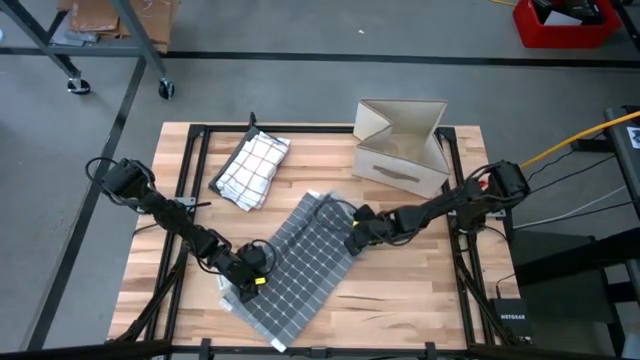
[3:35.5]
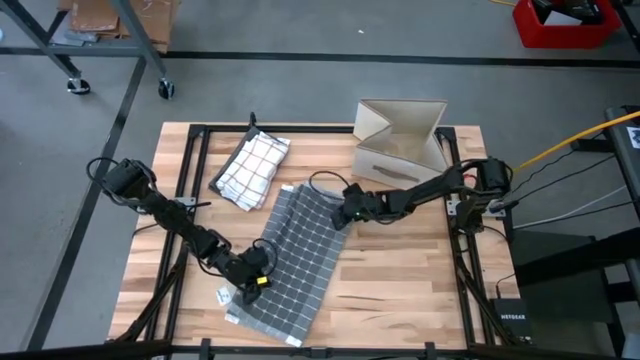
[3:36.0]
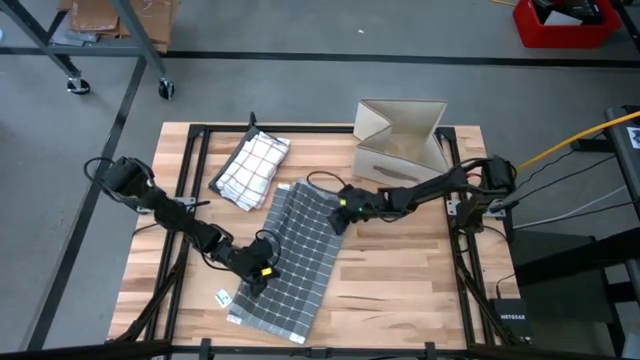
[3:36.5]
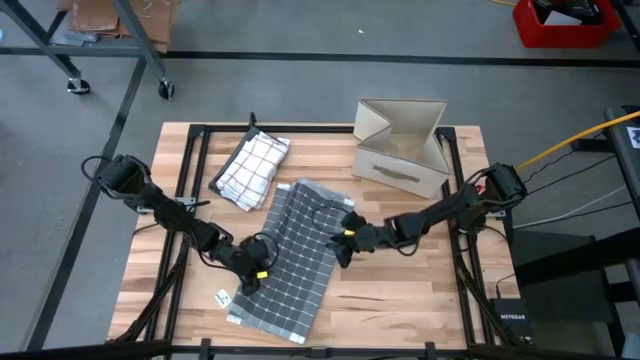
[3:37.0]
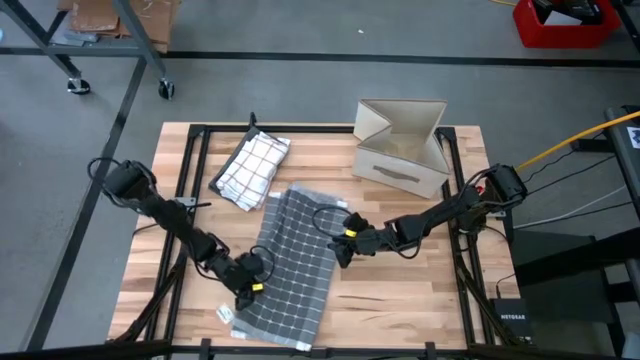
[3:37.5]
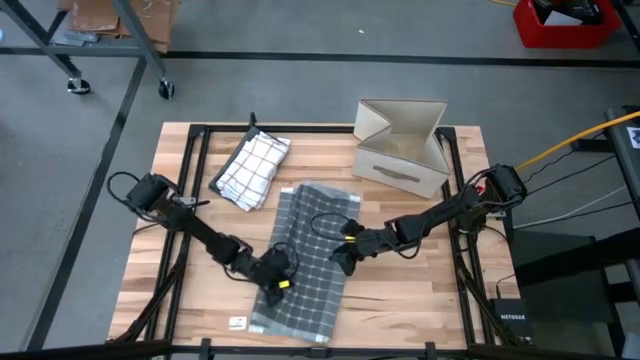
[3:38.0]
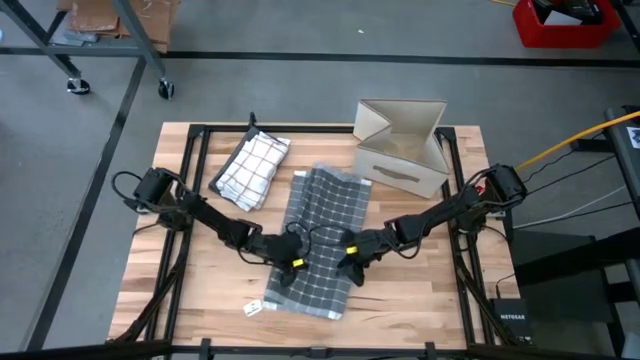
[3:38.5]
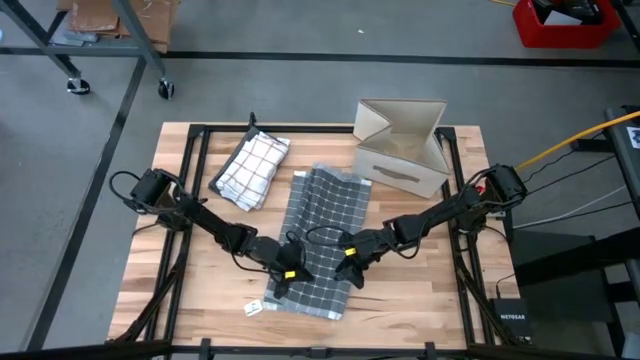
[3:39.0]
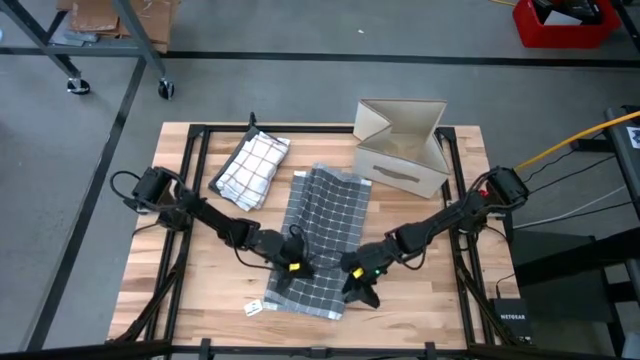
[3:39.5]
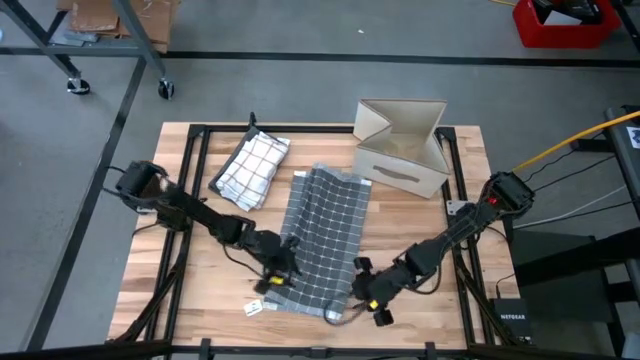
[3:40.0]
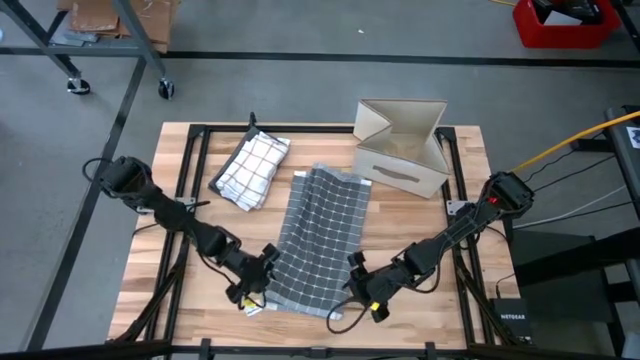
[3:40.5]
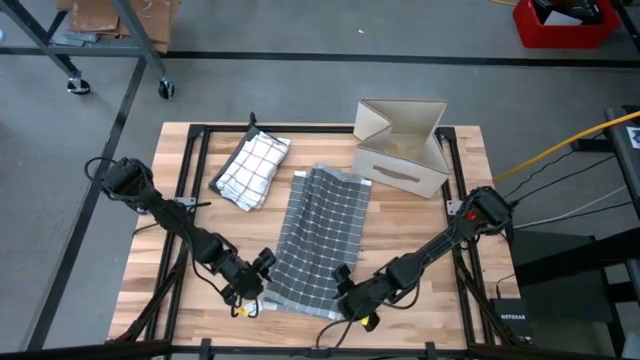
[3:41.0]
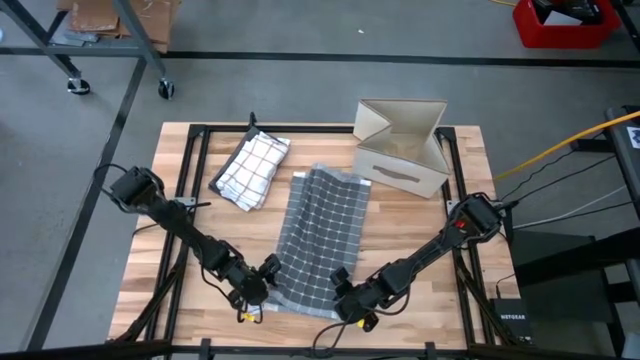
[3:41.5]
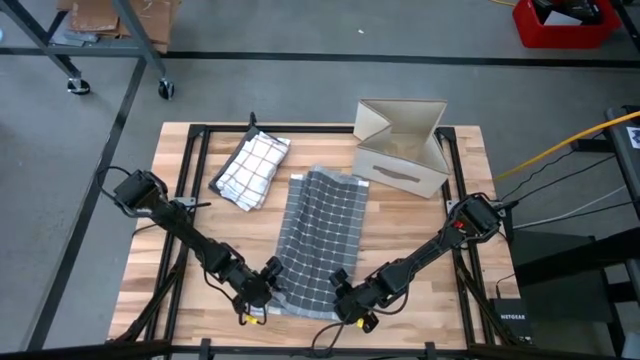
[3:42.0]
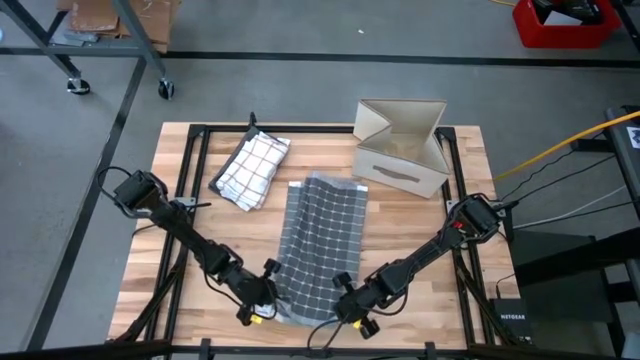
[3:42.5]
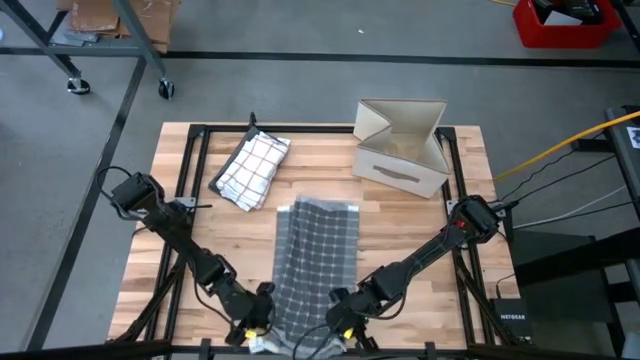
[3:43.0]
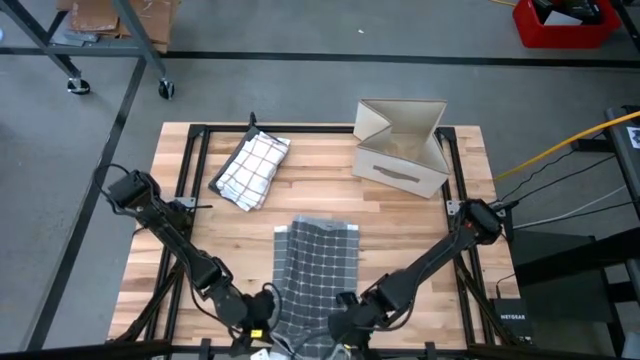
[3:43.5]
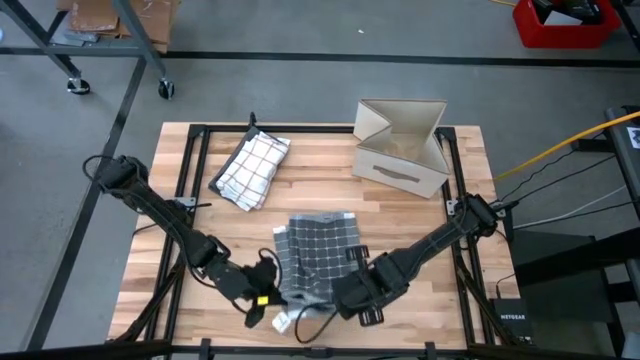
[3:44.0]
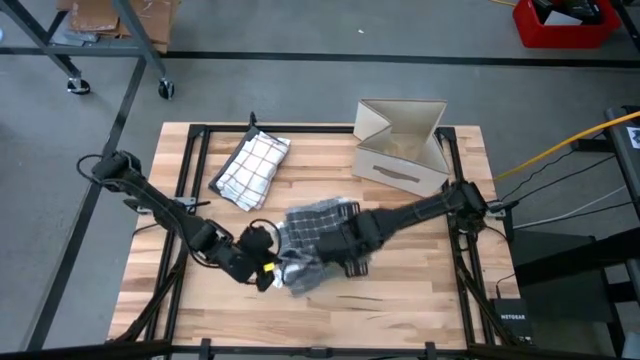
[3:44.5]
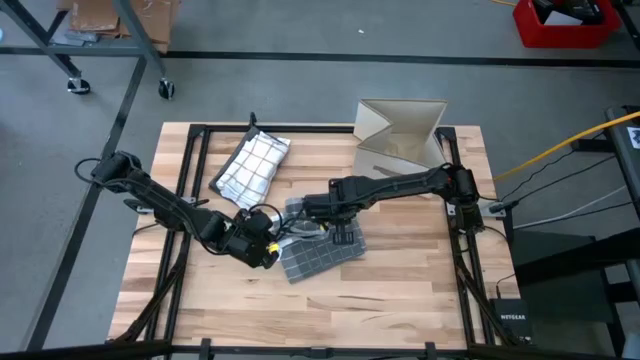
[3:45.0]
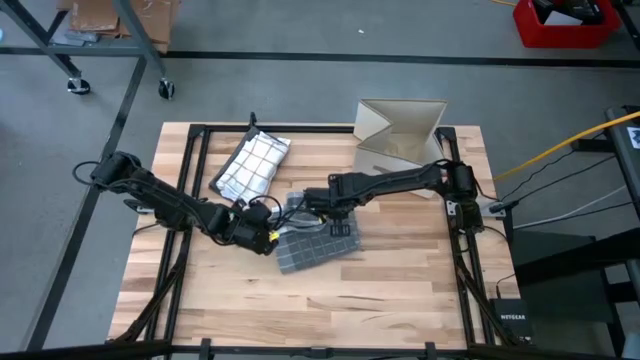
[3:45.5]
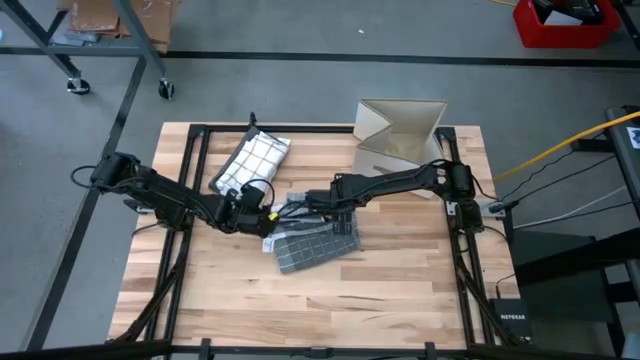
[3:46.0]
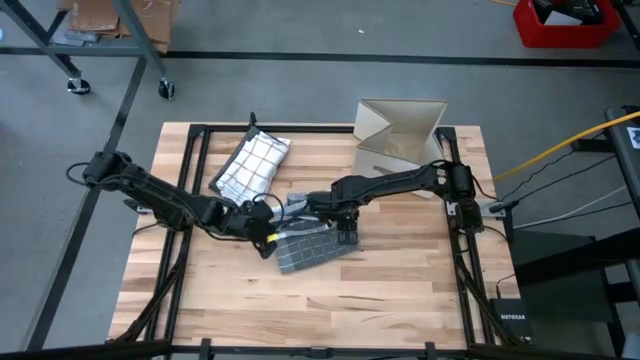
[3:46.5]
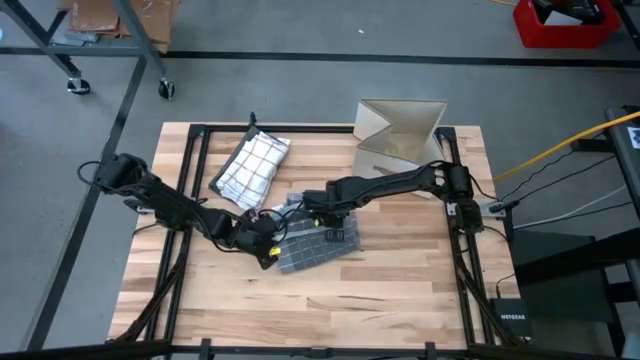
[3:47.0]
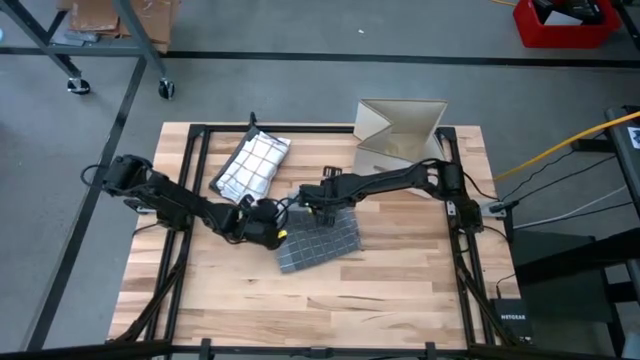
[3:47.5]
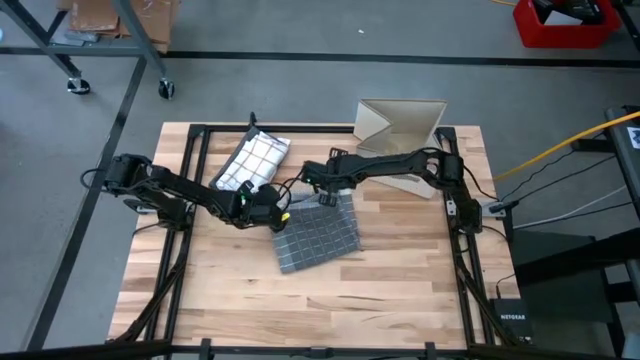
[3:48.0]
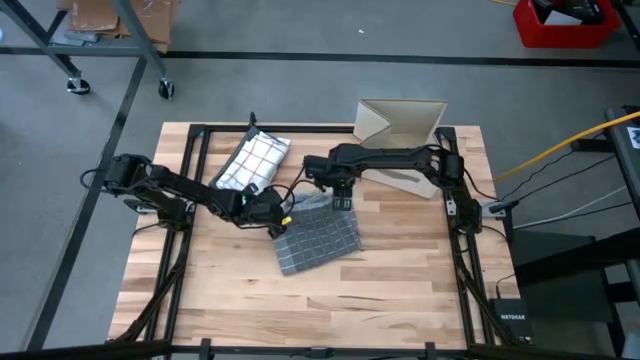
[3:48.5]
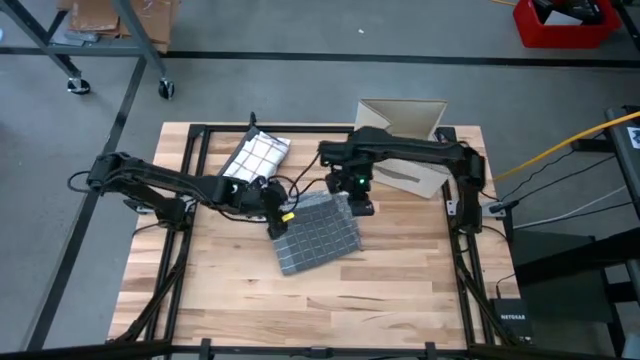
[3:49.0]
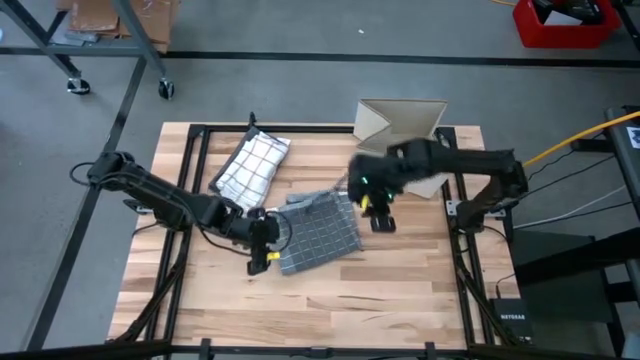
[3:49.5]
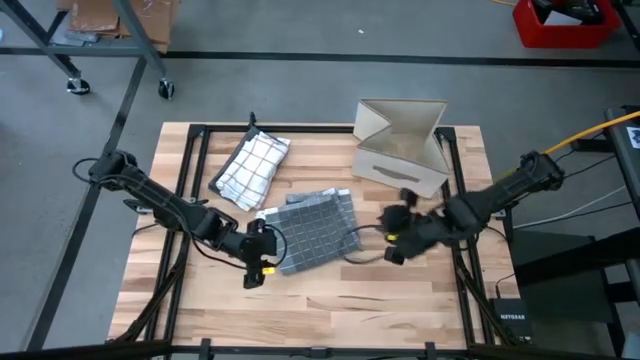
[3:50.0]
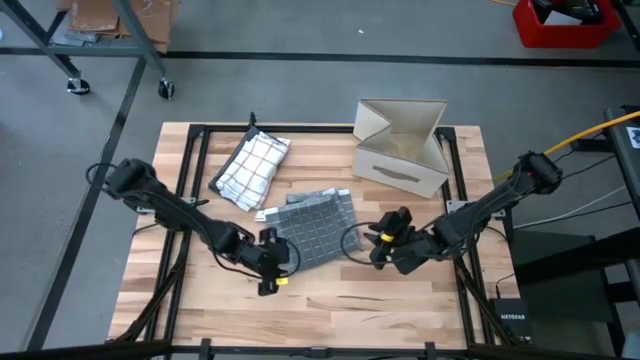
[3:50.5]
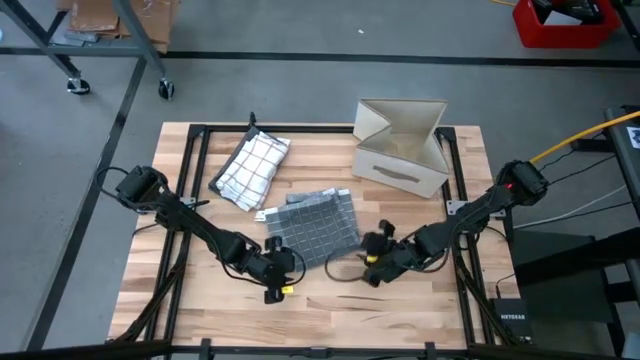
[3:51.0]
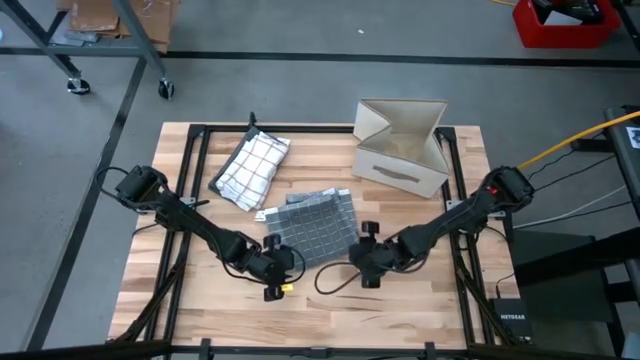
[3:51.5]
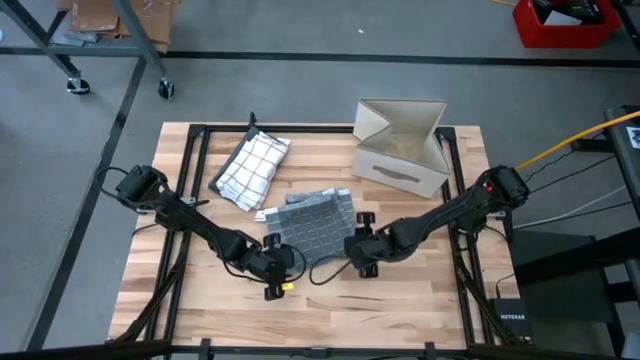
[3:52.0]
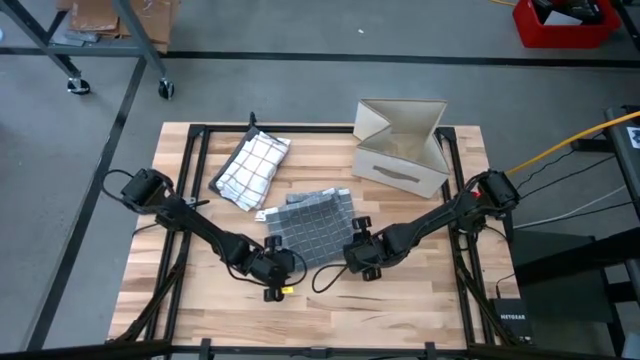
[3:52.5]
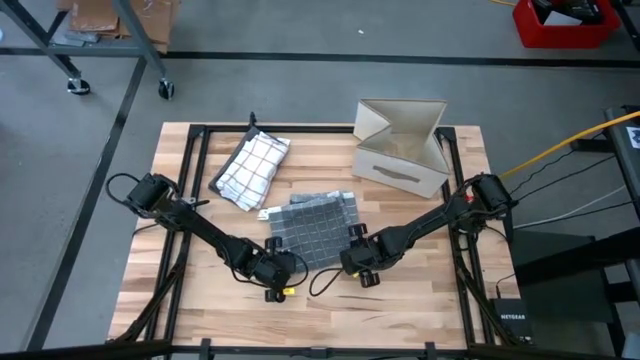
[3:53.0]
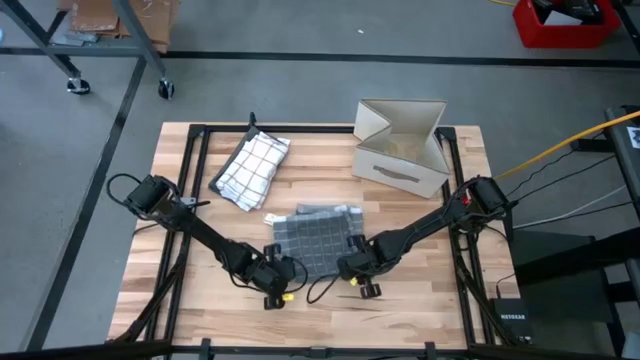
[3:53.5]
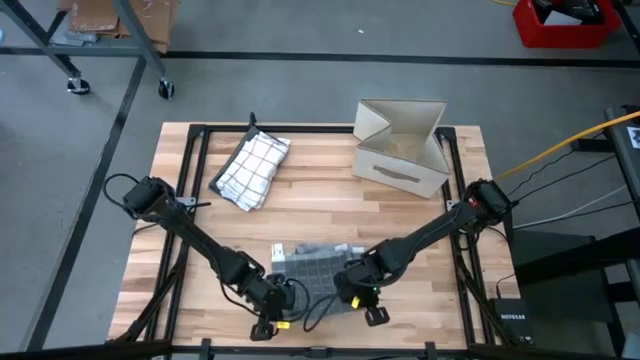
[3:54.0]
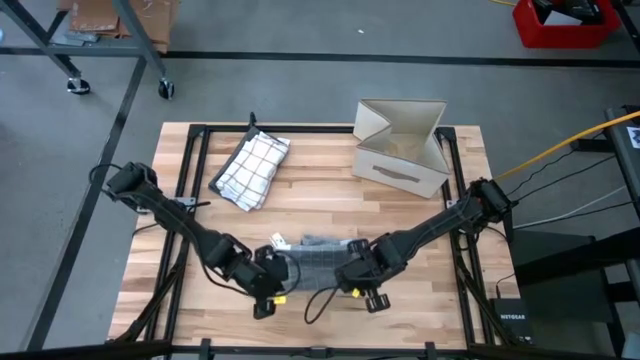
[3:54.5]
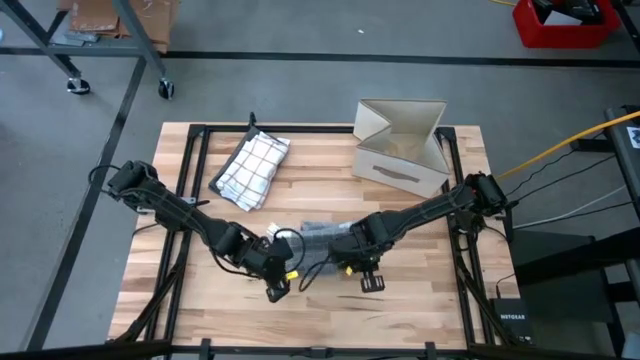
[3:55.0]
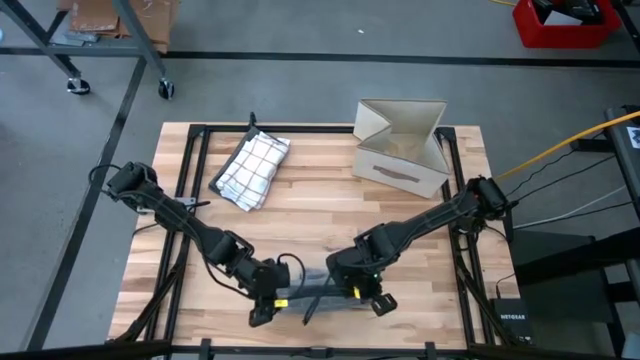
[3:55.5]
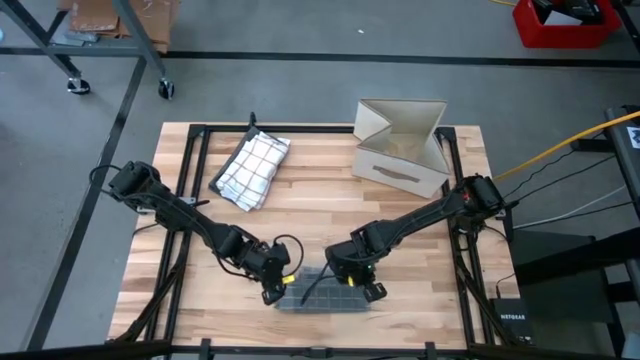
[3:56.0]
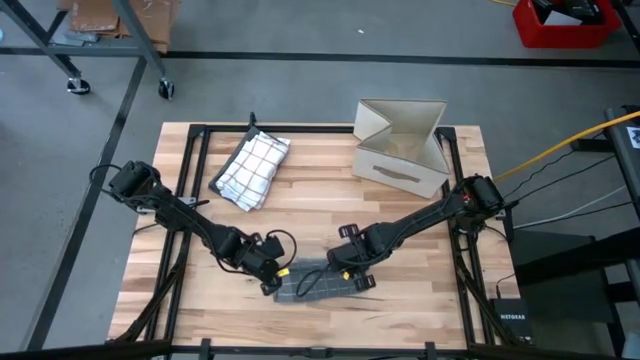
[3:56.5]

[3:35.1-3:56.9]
Task: Fold towel
Fold the gray white kitchen towel

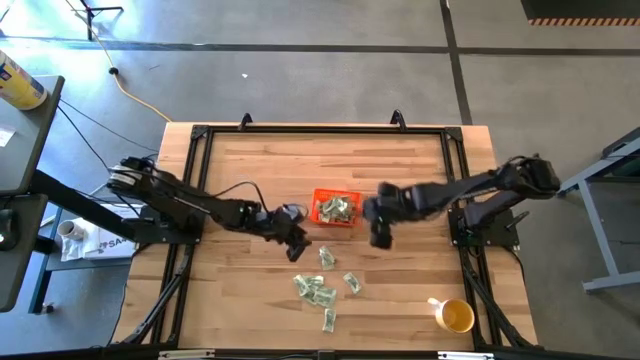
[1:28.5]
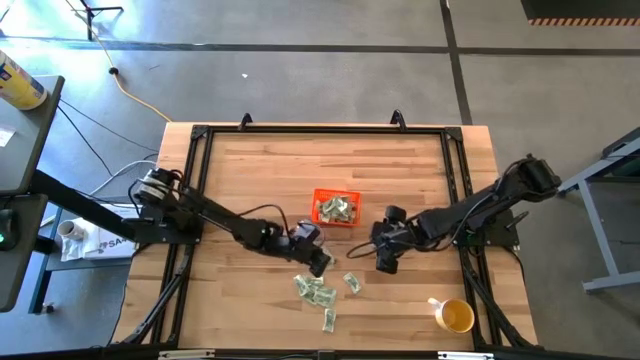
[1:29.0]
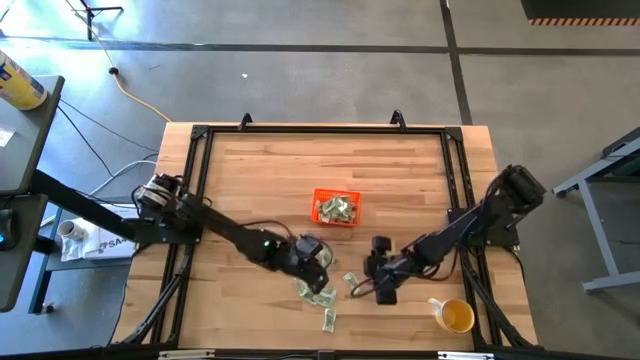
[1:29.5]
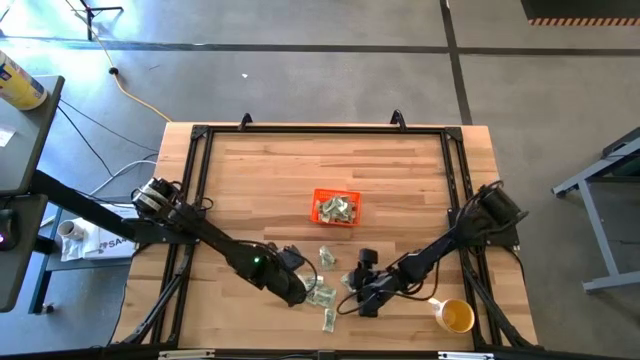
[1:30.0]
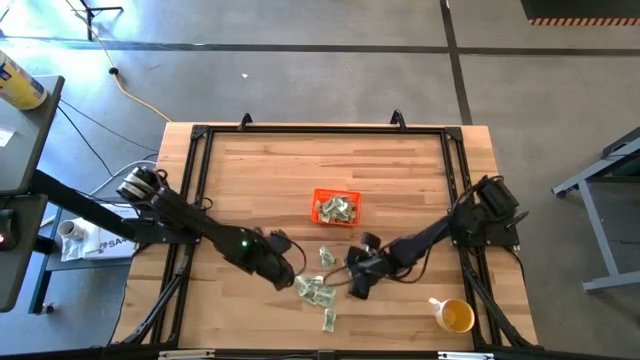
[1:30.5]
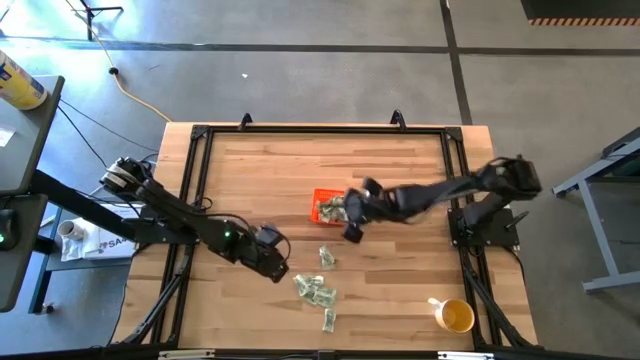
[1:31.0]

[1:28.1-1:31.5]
Task: Pick and place Stevia / Truvia into bins
Put the stevia packet into the orange bin
